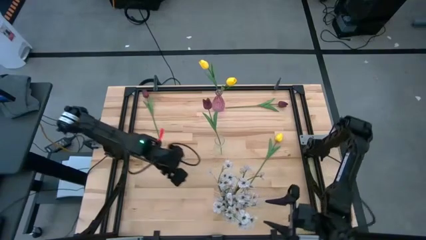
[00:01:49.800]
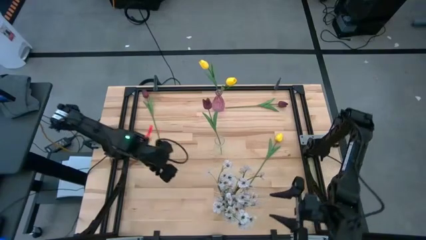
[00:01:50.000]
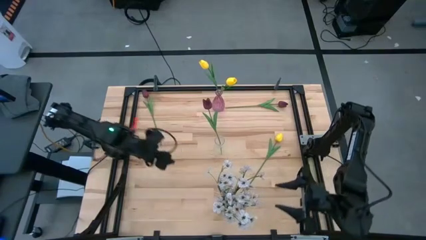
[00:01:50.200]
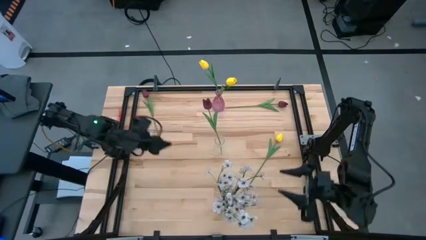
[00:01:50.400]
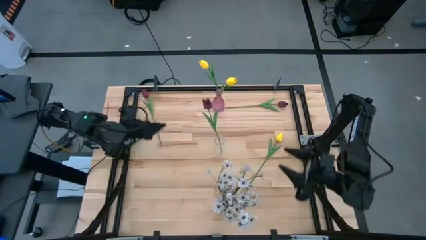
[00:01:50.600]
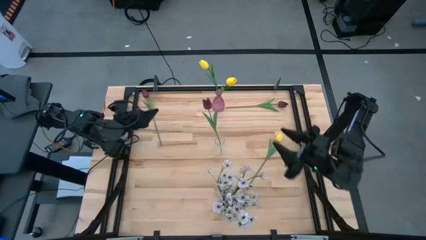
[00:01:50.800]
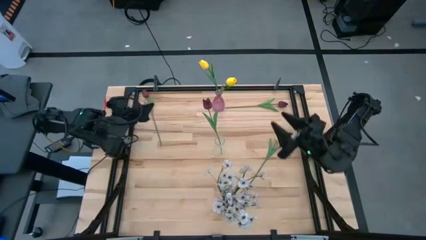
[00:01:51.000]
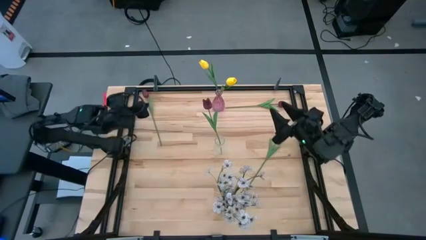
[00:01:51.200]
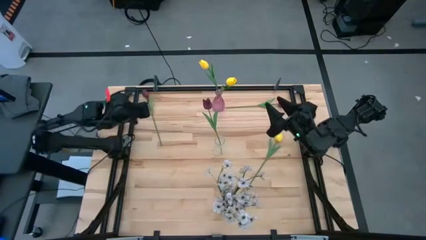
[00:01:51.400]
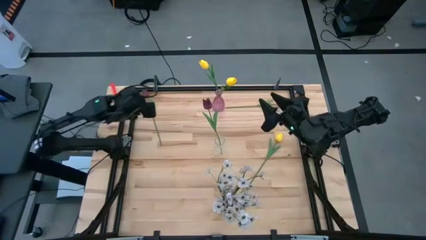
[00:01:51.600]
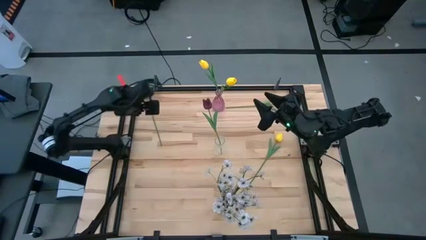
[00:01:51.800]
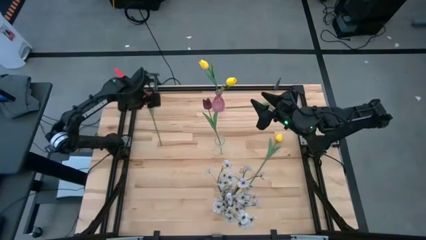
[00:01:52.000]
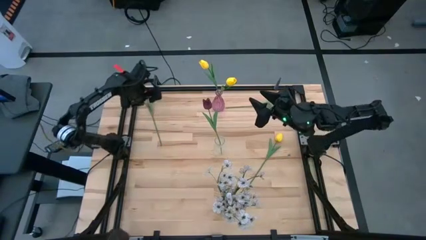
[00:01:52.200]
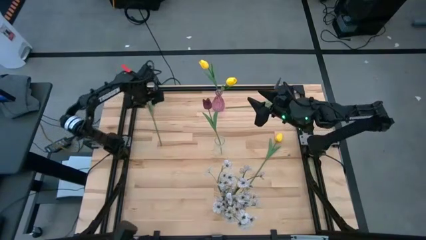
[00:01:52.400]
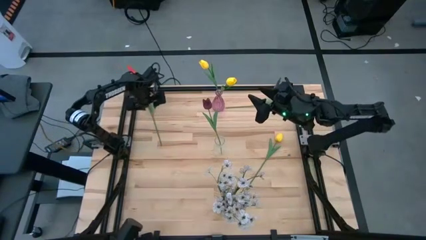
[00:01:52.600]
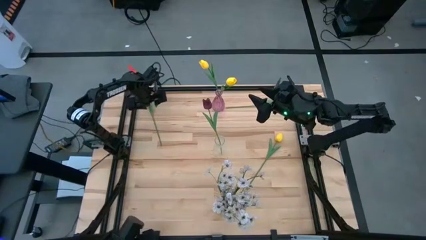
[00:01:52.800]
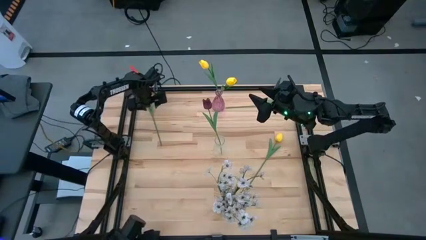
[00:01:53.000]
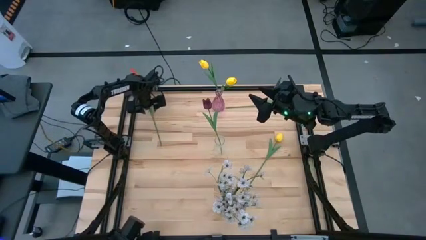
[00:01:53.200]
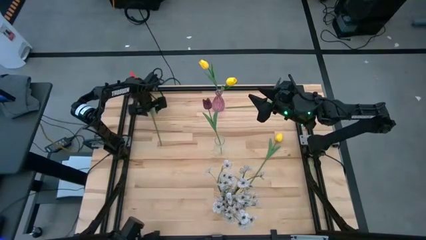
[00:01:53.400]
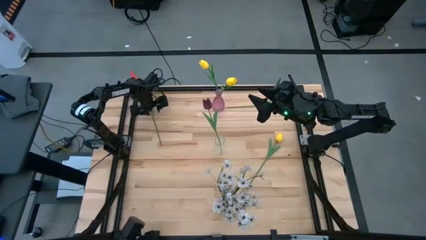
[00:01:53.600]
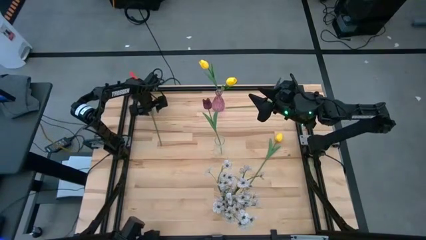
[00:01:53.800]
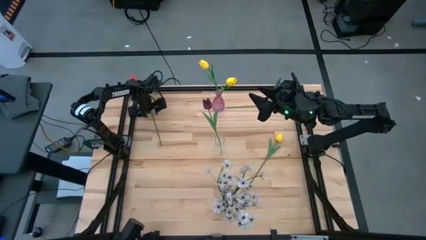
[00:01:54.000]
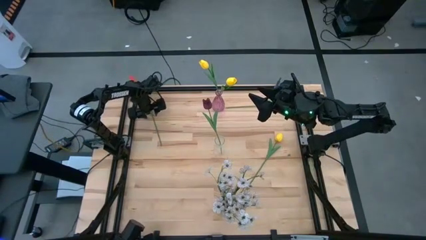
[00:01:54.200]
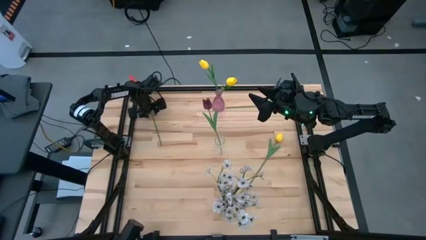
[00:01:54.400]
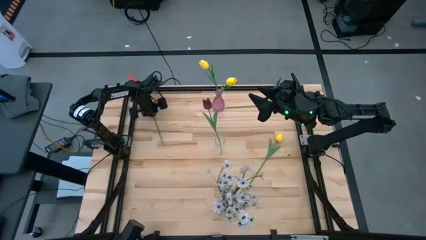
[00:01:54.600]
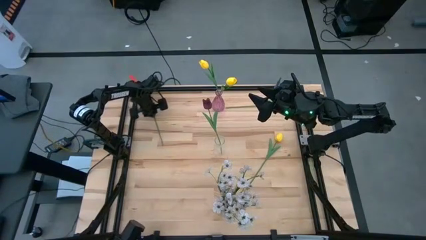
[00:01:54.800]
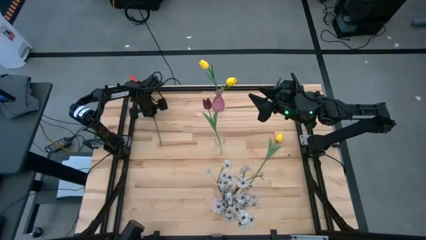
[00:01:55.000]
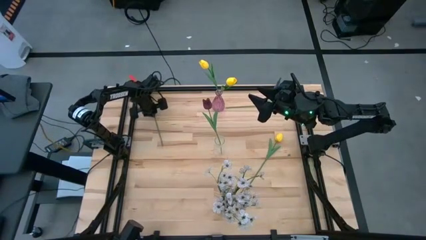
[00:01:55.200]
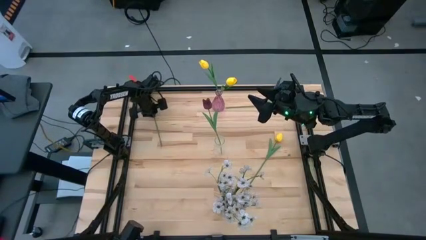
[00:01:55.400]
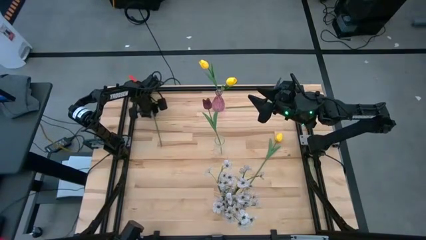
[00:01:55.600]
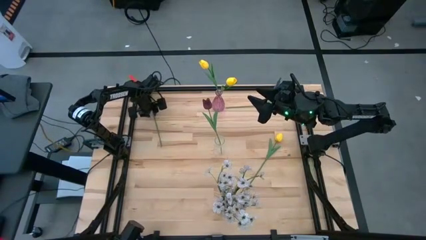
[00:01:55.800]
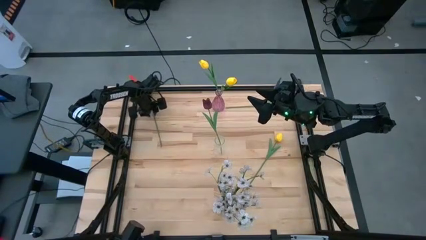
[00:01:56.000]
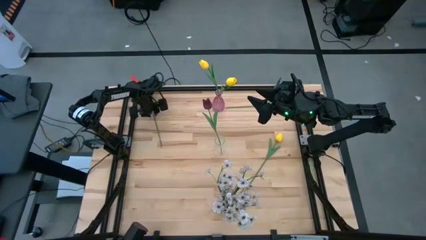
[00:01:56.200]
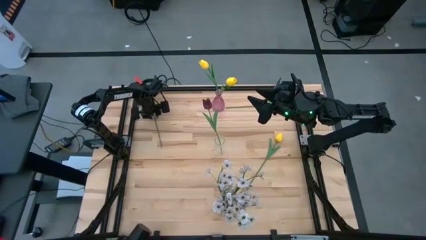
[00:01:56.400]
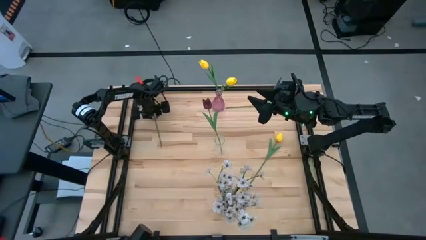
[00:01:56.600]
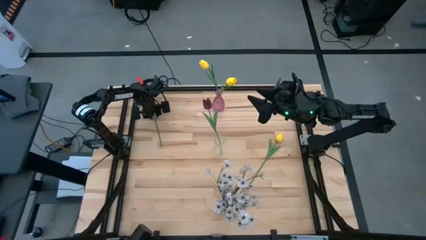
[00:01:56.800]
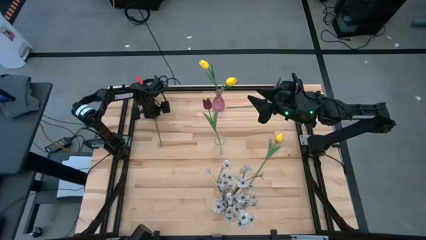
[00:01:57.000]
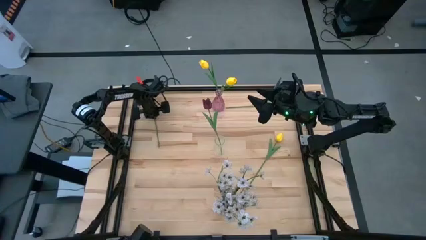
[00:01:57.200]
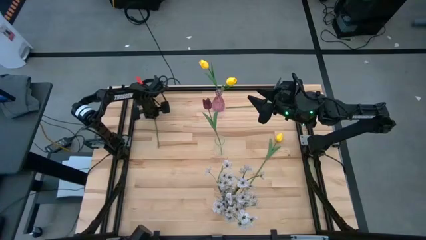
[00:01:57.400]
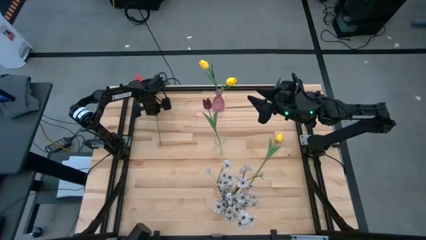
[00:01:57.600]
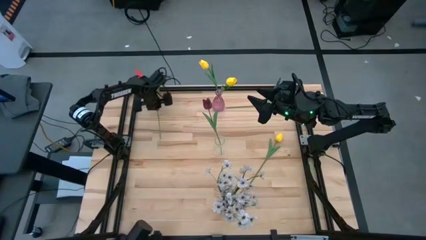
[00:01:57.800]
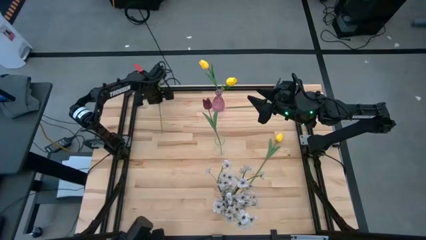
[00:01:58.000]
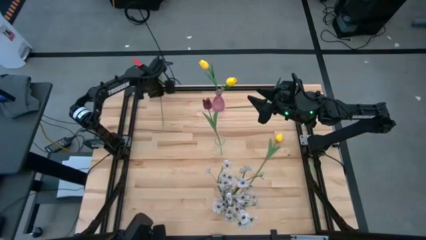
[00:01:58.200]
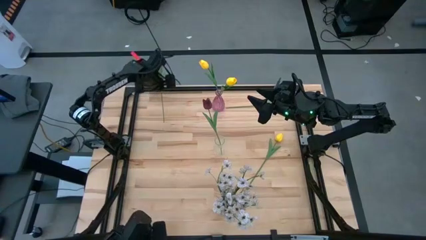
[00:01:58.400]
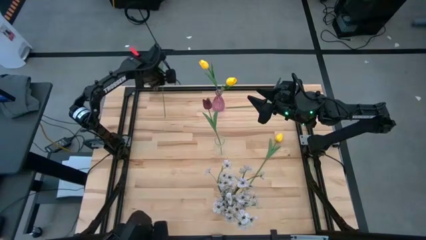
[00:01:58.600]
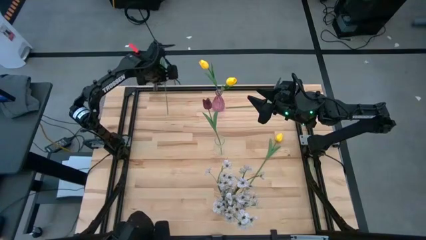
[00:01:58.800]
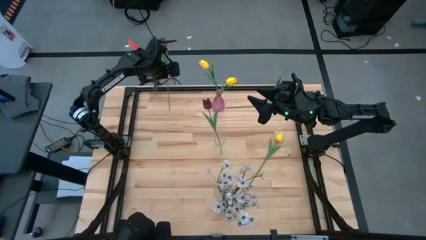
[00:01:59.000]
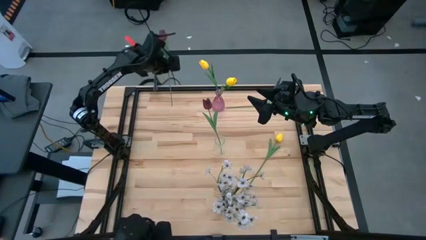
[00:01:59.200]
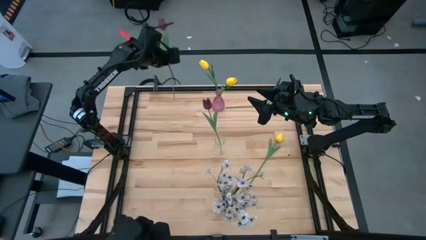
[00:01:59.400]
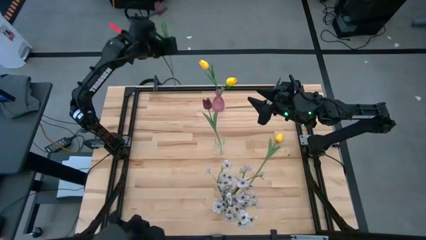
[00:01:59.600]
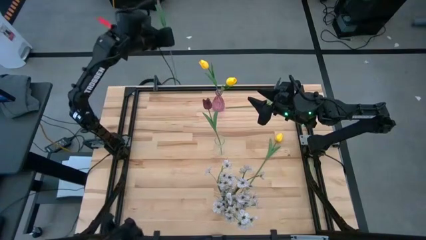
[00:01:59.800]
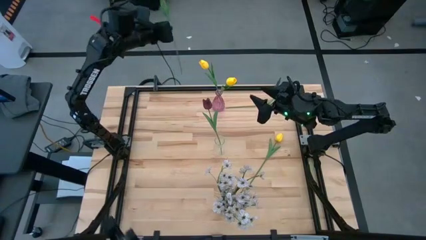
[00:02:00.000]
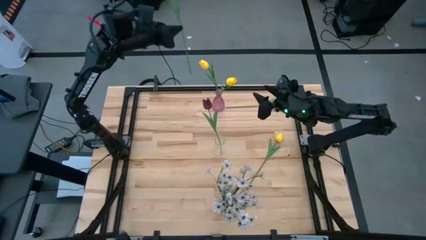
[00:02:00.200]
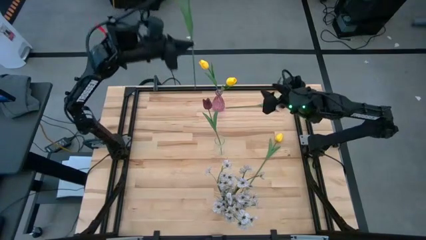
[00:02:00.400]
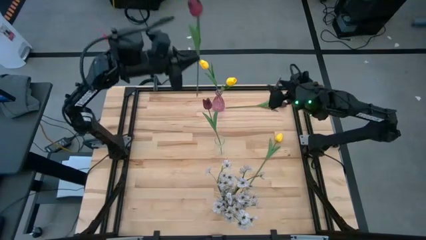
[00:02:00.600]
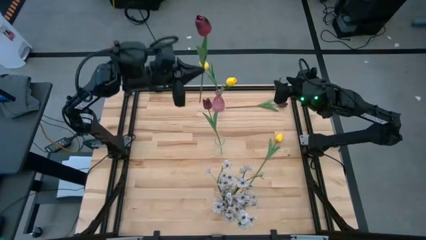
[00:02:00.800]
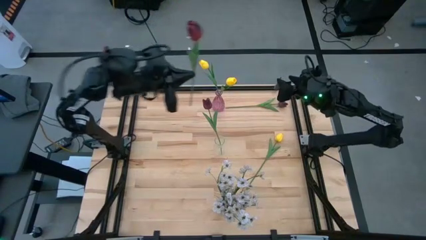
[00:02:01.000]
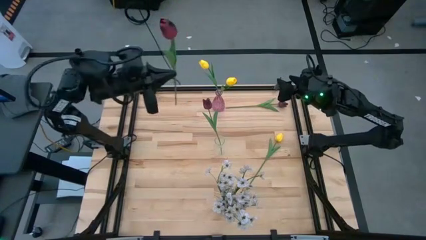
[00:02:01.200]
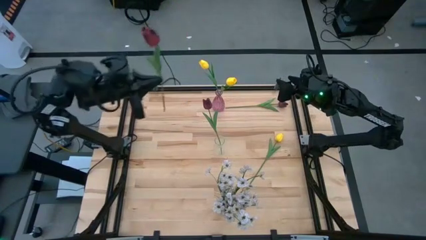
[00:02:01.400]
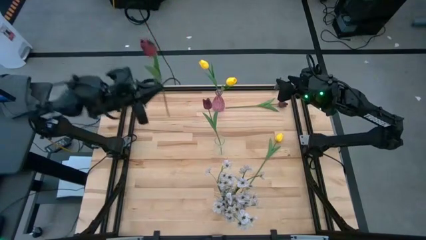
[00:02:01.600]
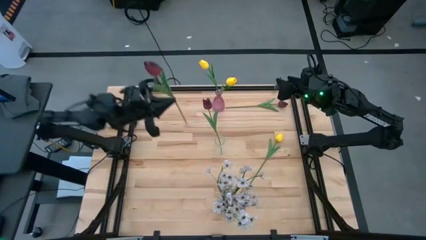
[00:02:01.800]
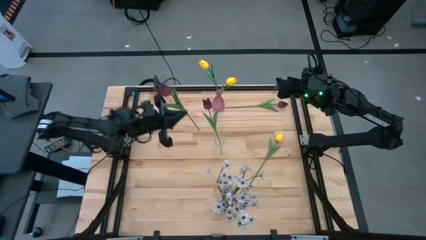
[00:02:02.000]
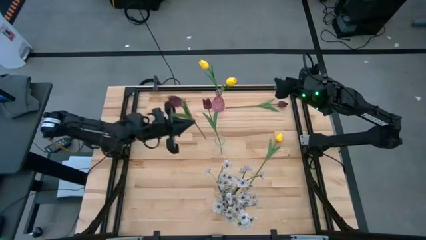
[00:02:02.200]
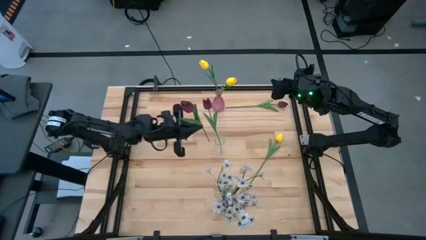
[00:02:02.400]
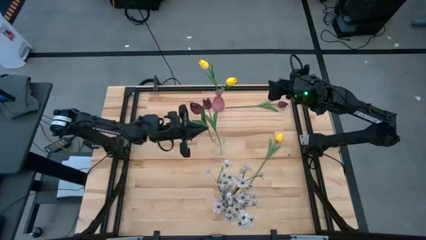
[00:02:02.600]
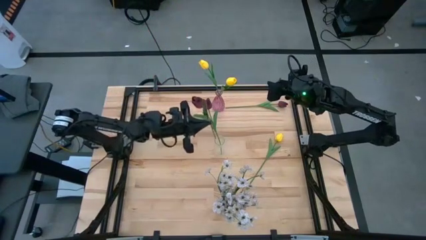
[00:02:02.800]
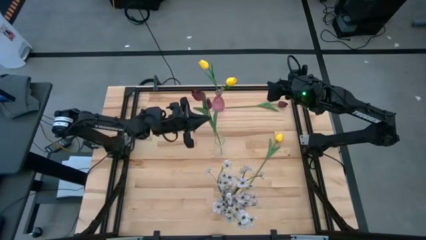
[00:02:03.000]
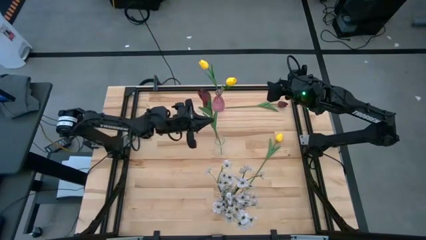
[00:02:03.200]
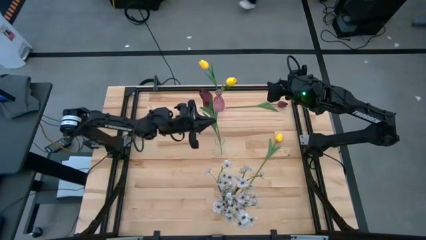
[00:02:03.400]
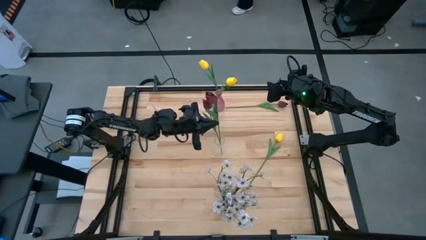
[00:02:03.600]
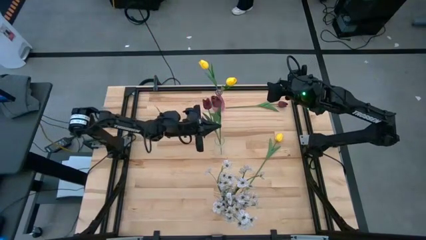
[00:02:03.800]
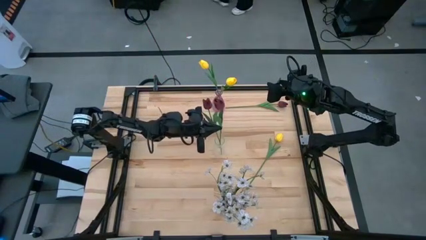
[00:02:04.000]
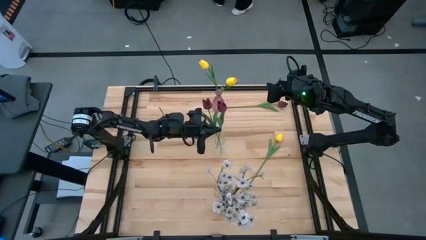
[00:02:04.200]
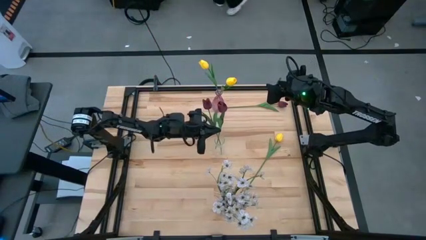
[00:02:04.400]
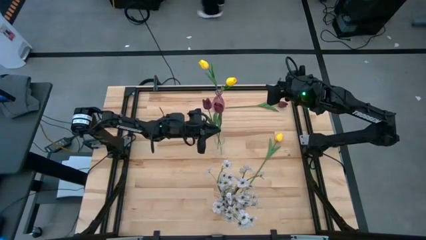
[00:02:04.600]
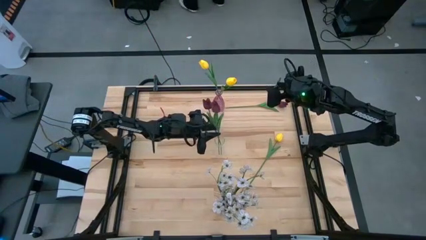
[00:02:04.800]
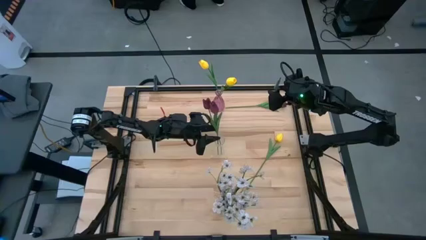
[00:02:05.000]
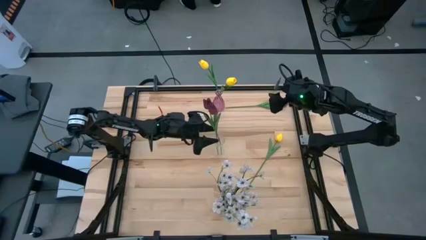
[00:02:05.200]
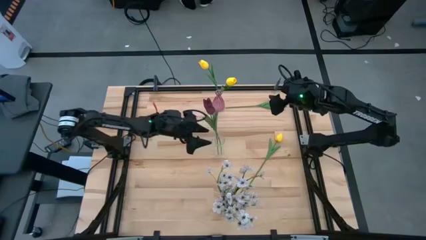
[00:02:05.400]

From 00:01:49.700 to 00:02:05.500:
Task: Sort flowers into vase by color
Put the left red flower into the top transparent vase
